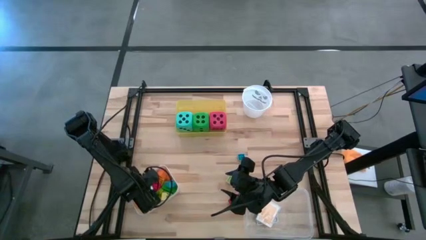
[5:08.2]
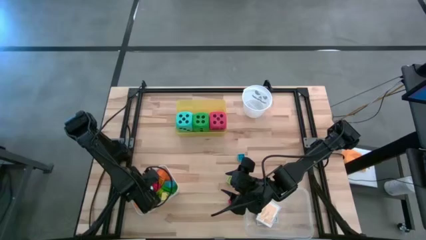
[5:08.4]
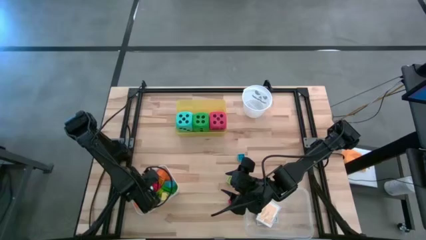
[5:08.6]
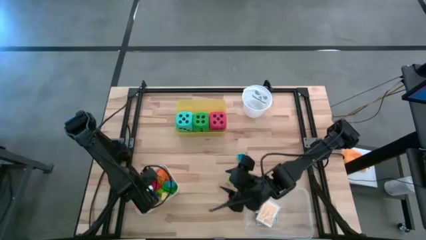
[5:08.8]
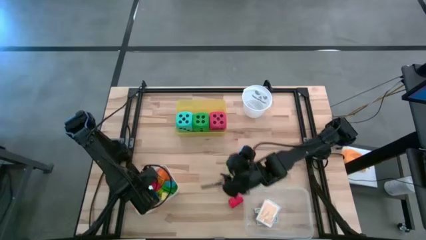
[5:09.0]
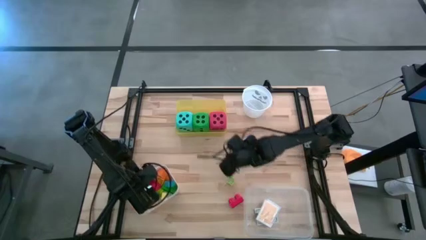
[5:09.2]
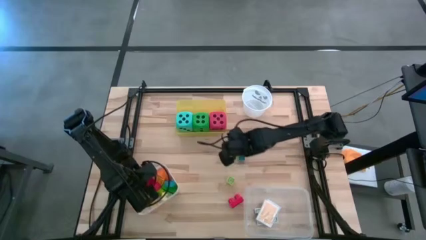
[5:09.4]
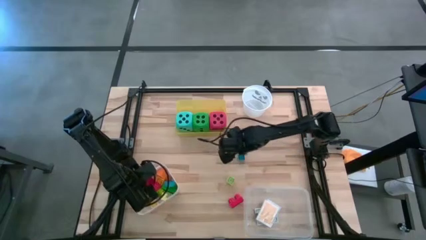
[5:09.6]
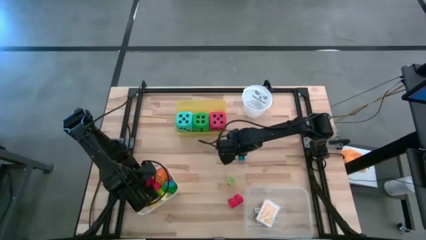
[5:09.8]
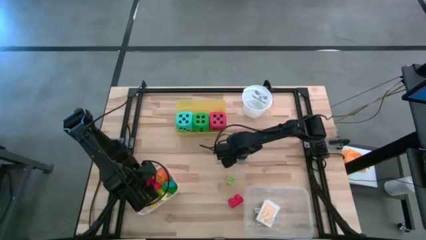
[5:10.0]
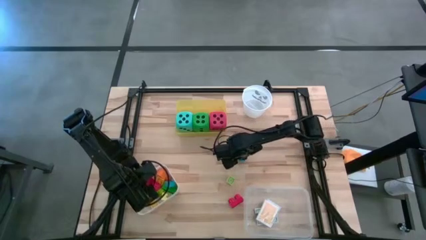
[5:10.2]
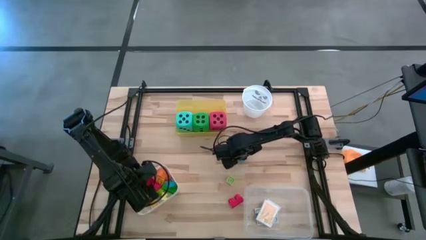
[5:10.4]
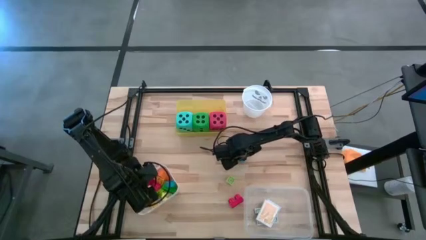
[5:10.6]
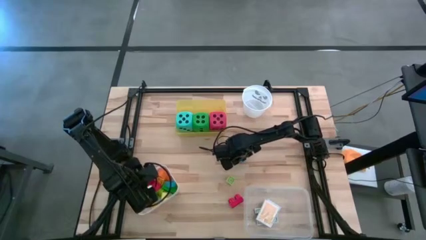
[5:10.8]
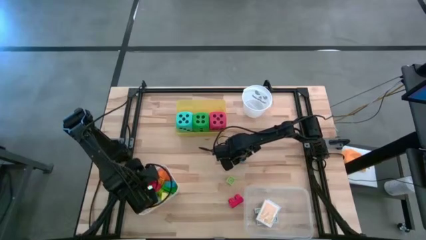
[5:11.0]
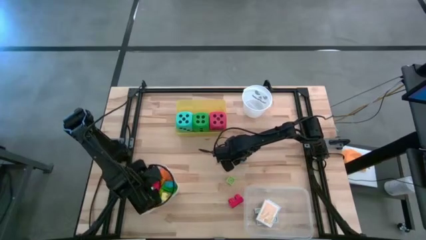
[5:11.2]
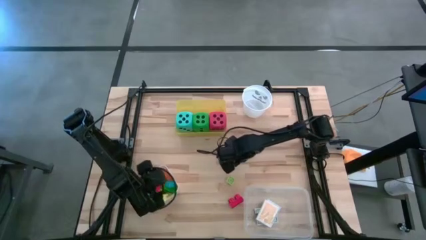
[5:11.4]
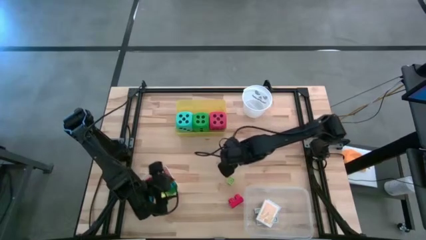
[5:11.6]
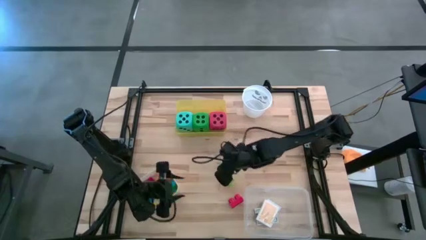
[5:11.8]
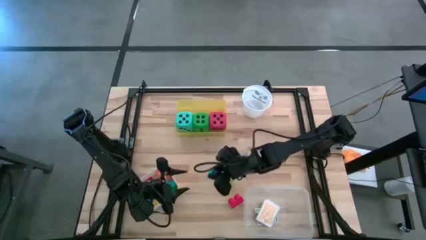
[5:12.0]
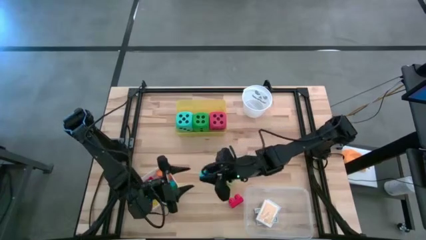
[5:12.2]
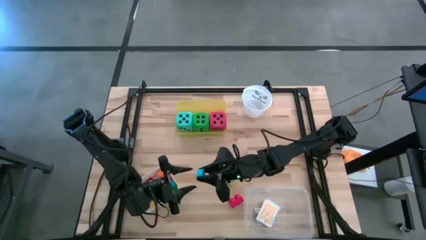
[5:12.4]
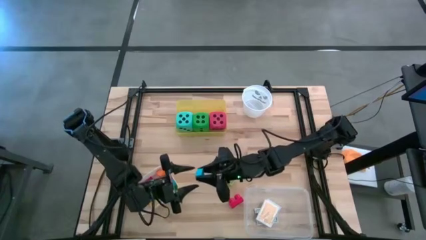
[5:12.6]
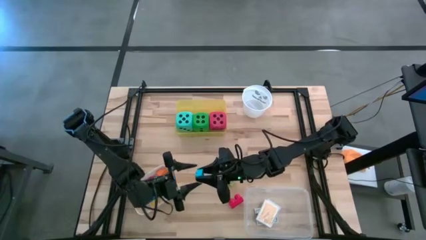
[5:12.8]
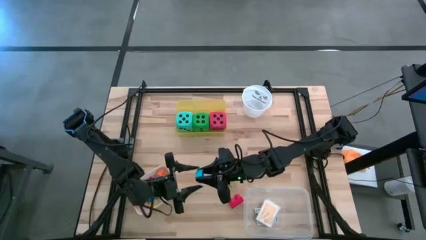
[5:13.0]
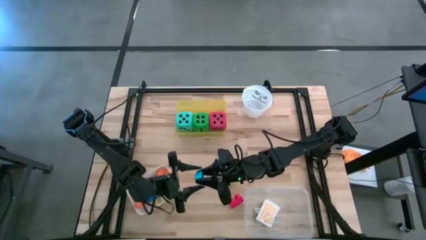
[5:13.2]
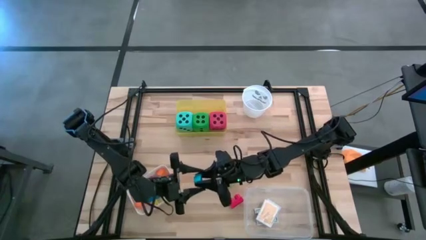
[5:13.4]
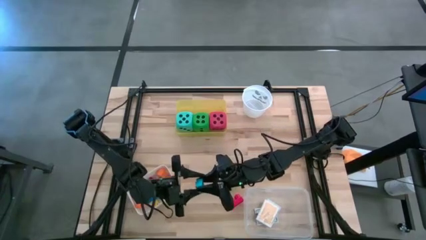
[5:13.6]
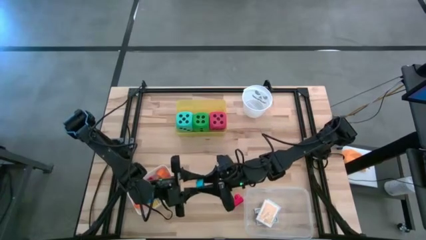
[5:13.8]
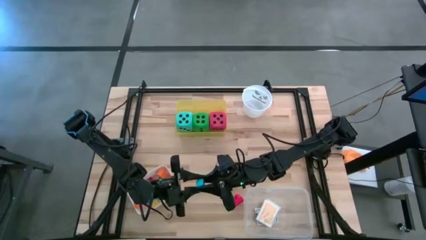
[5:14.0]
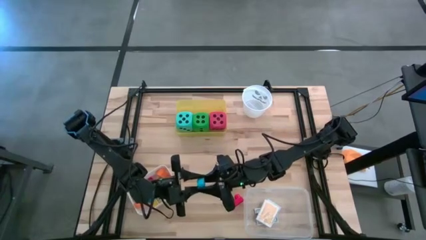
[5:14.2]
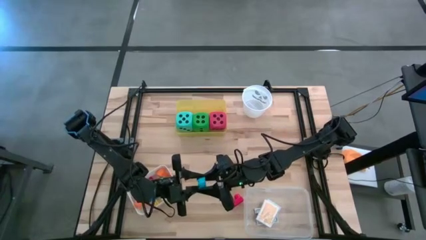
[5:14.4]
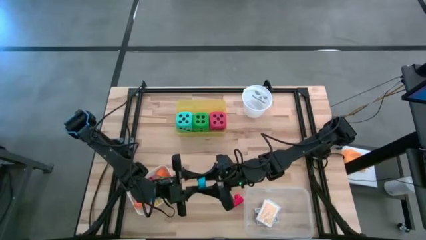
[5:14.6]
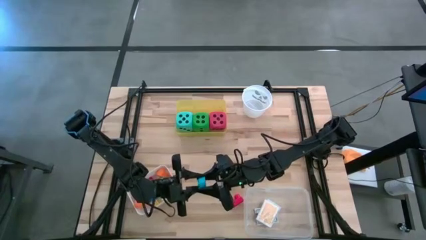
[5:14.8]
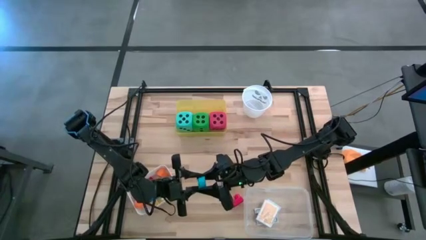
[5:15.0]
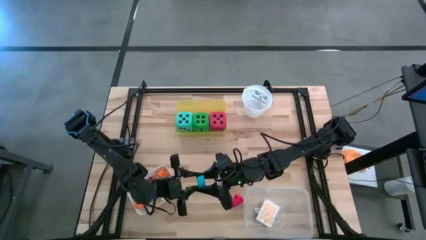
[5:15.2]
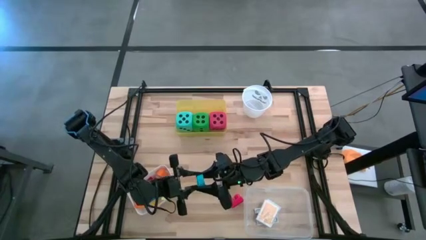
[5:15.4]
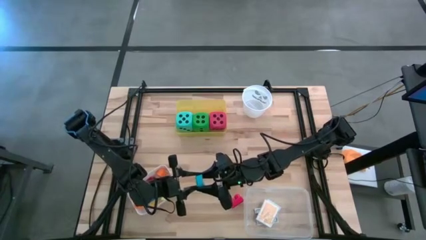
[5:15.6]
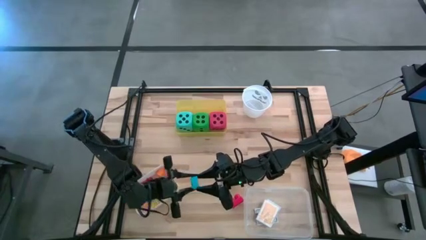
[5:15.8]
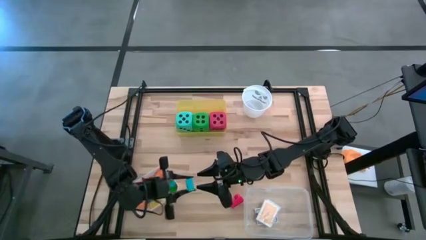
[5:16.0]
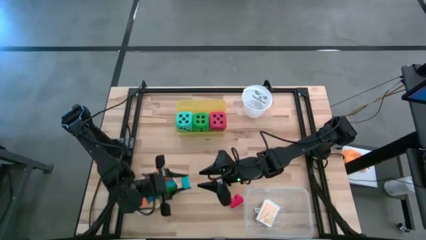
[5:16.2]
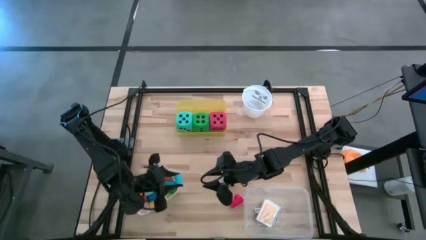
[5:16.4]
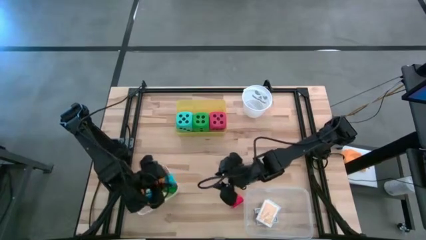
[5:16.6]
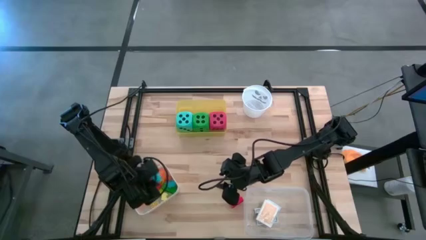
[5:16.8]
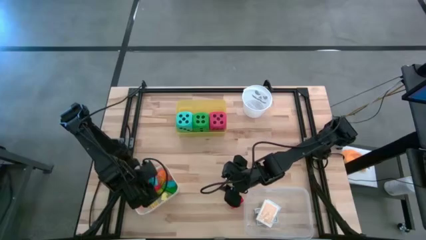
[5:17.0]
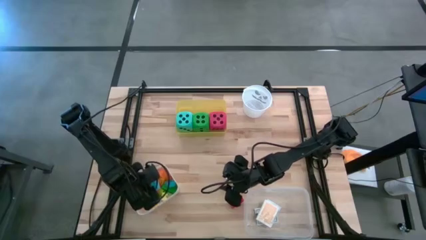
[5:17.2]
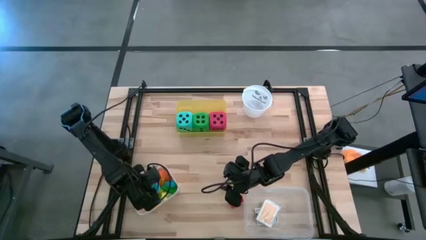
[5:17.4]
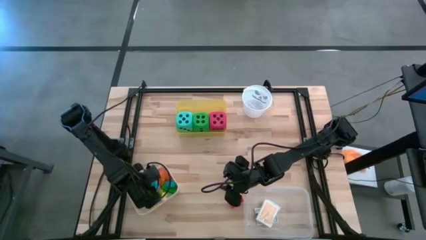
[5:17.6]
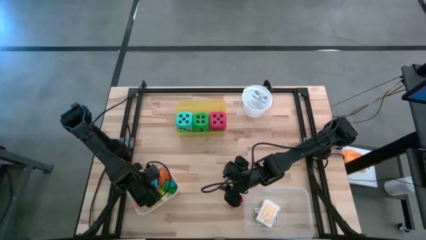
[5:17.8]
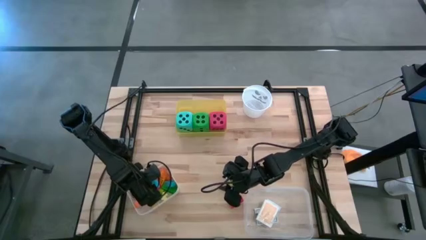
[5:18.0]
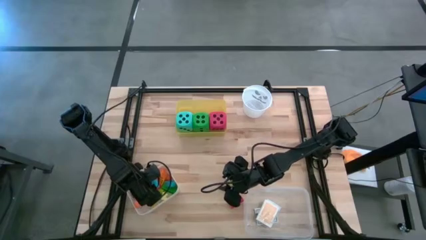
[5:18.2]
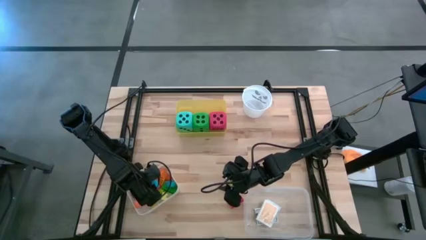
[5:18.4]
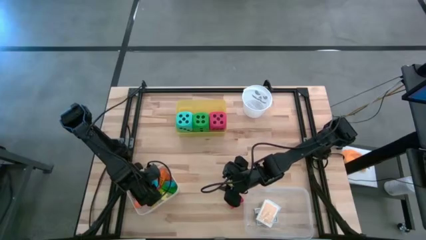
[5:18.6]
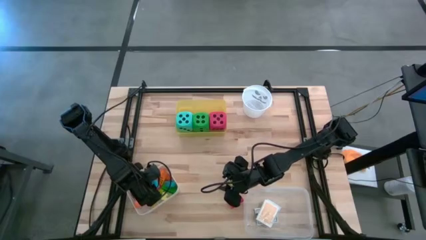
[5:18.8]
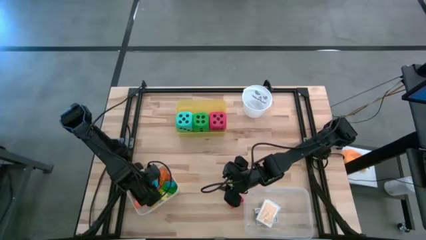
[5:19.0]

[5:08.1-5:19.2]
Task: Pick & Place Toys
Put the blue game piece into the white bin

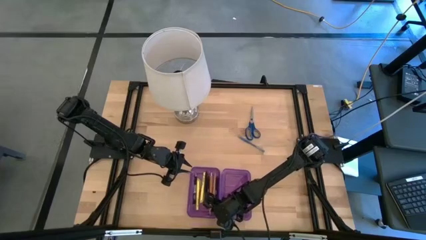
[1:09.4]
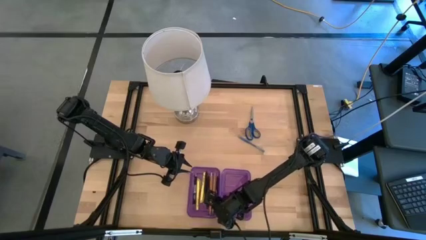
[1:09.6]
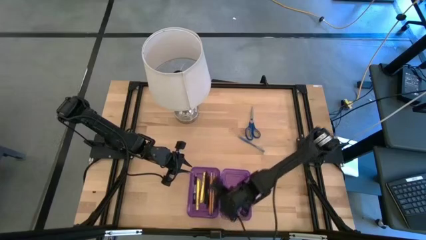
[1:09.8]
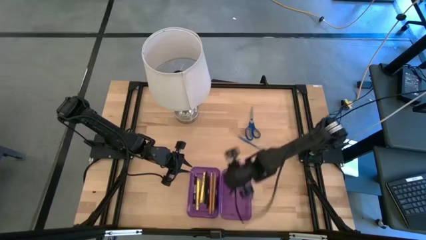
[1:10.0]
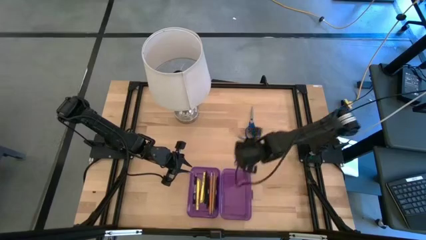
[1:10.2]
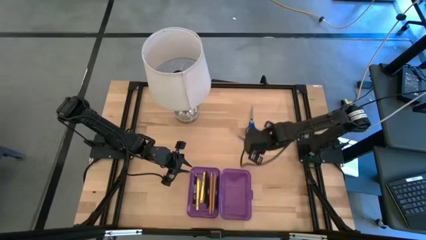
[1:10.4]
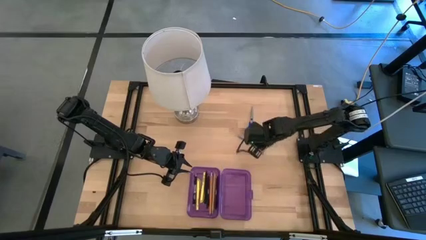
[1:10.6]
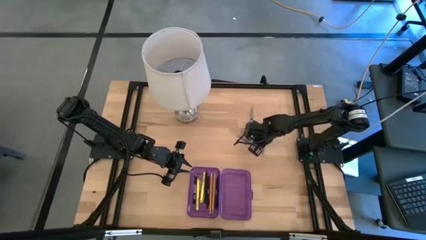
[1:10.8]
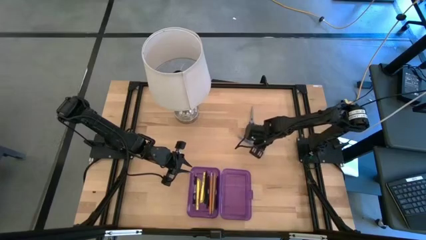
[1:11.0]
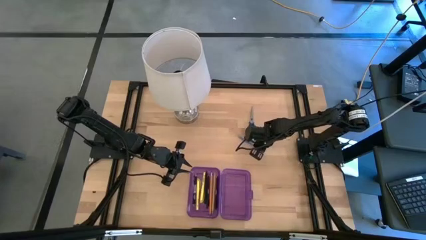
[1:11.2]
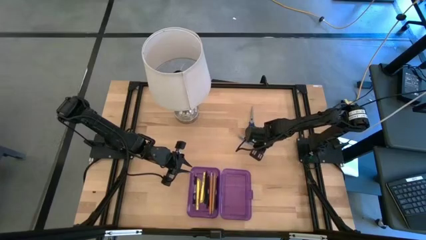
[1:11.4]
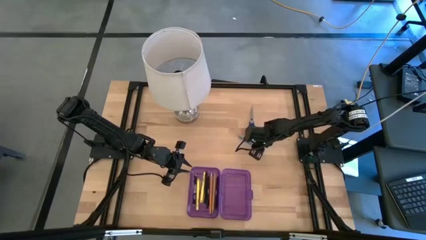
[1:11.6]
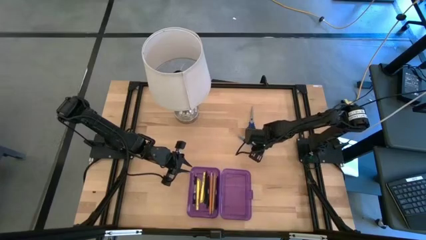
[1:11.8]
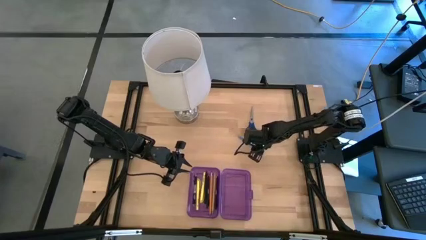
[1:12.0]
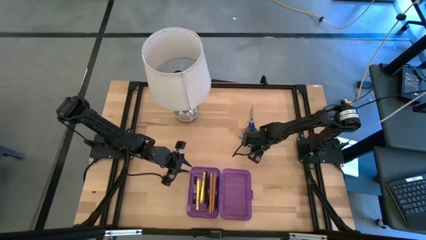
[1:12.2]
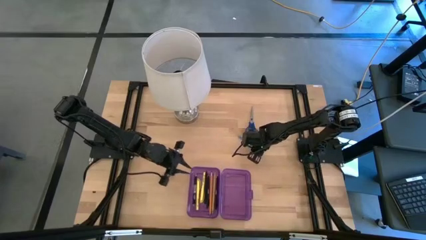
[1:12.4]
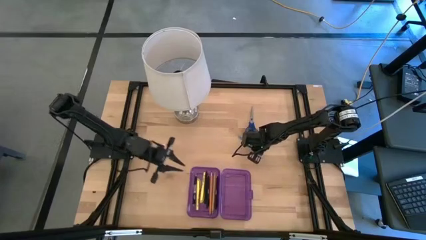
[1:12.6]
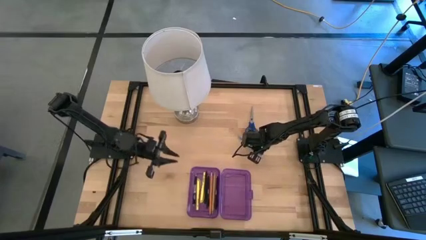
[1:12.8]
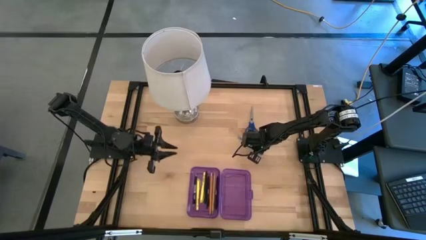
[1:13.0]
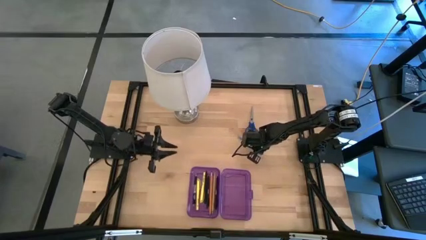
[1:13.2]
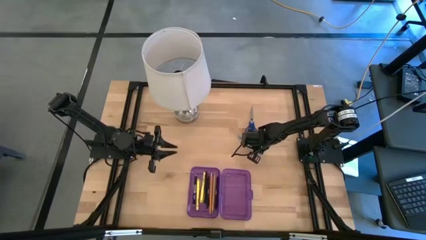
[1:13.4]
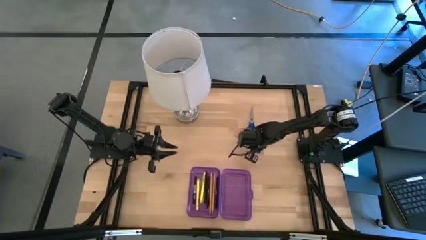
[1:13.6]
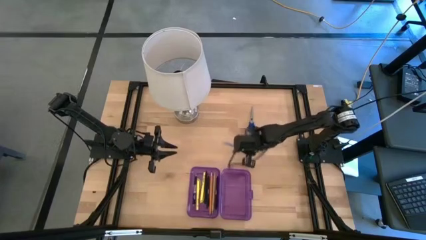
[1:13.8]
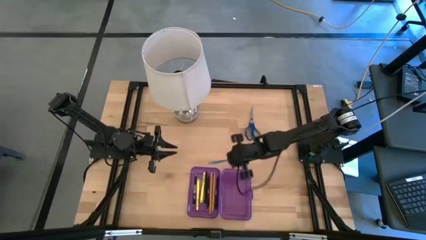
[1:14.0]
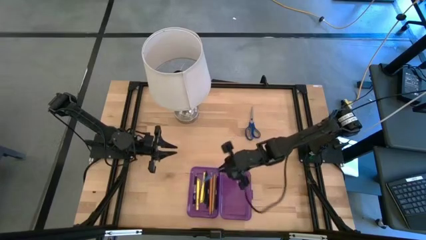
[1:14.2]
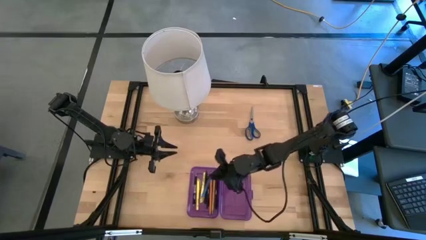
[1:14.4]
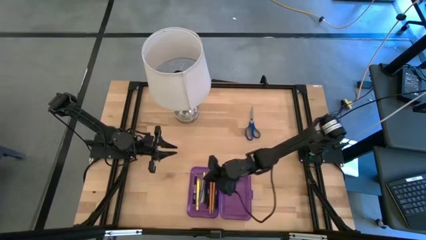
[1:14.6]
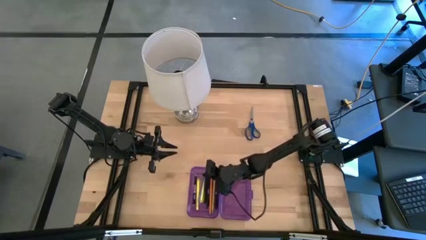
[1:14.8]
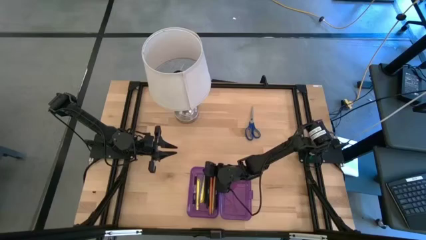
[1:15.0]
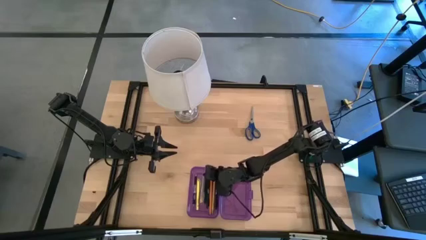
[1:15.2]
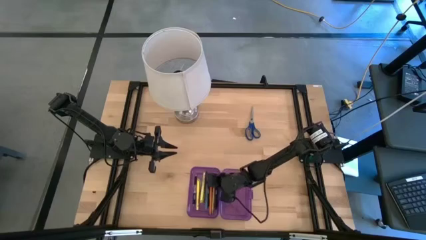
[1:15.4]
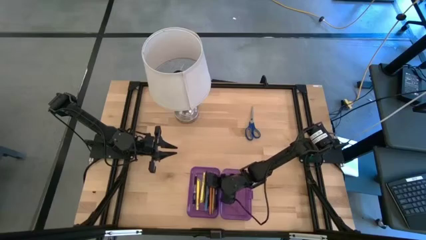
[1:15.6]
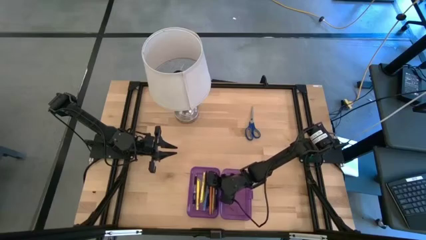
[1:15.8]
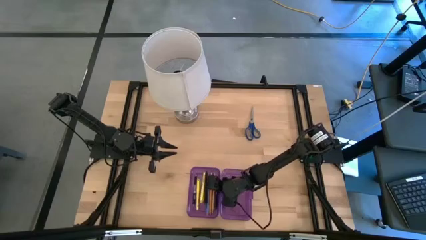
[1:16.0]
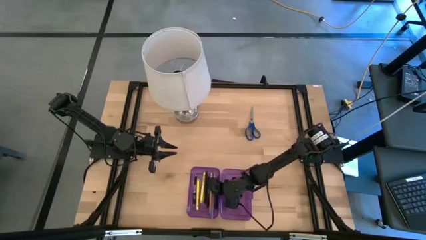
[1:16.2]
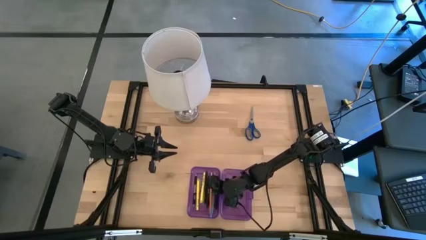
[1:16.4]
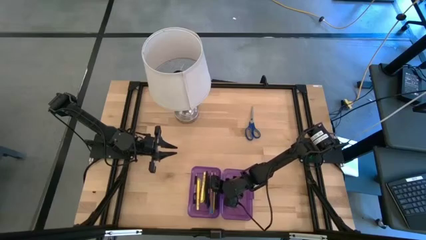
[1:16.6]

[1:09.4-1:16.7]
Task: Pick & place school supplies into a supply box
Put the blue pen into the violet supply box
